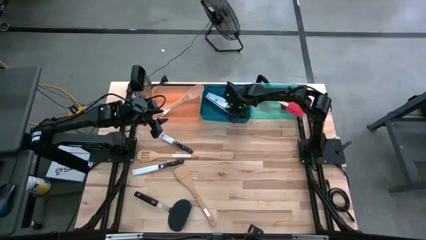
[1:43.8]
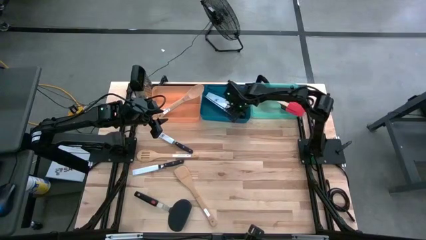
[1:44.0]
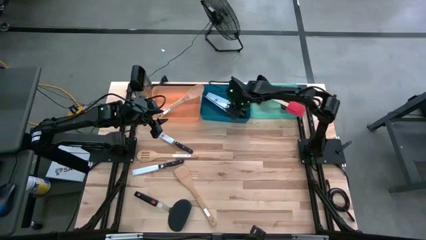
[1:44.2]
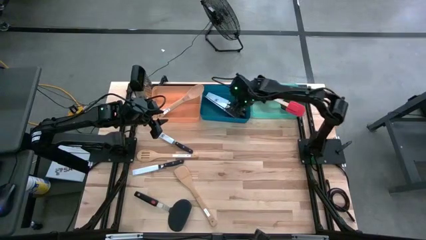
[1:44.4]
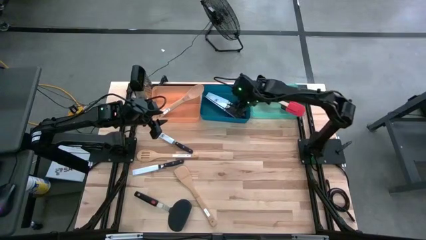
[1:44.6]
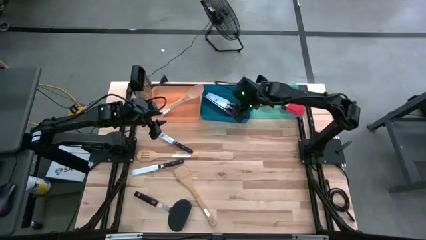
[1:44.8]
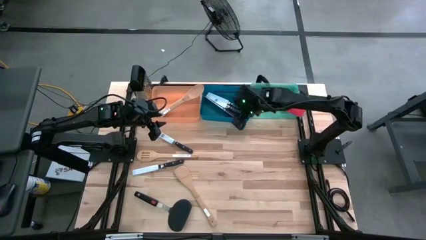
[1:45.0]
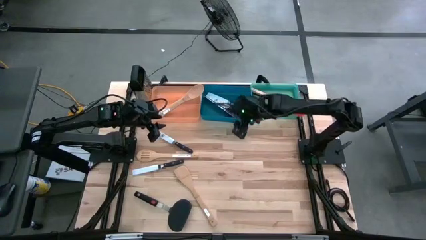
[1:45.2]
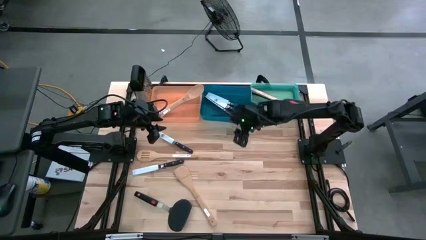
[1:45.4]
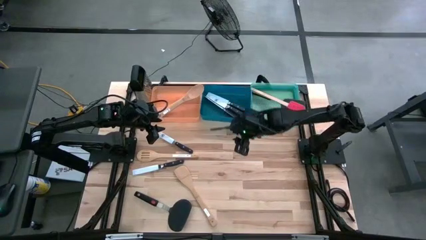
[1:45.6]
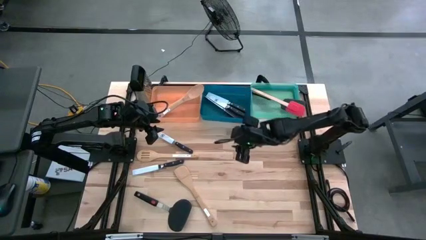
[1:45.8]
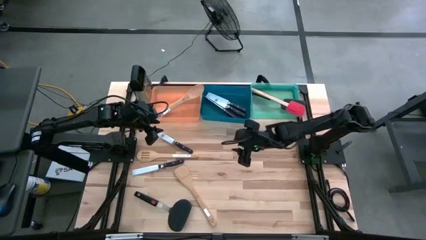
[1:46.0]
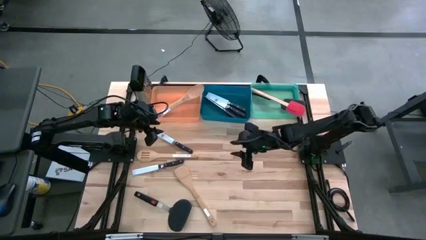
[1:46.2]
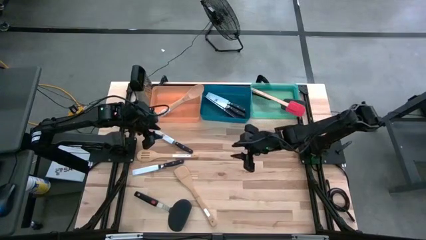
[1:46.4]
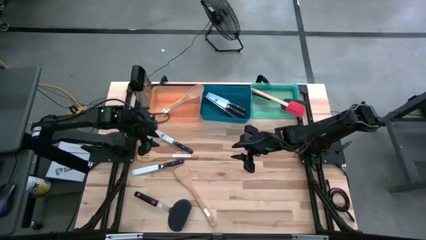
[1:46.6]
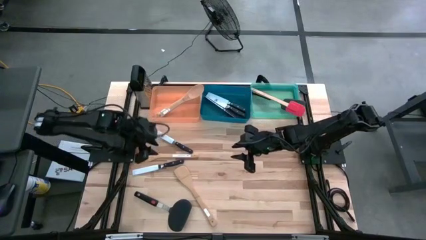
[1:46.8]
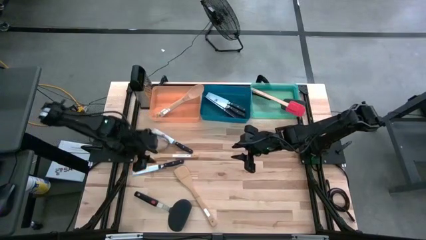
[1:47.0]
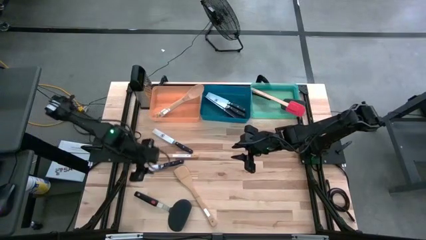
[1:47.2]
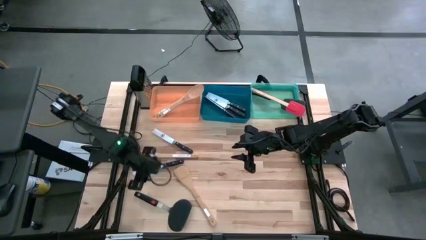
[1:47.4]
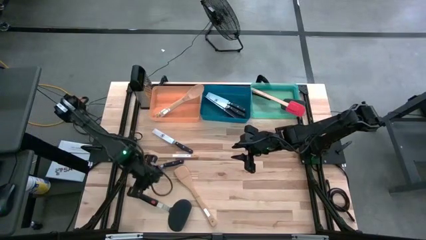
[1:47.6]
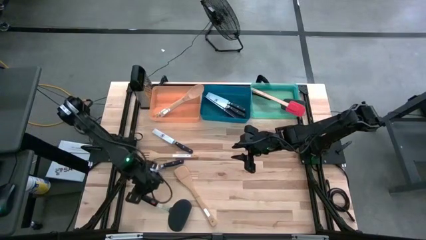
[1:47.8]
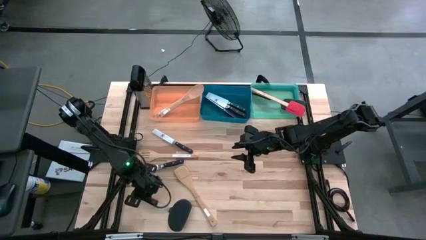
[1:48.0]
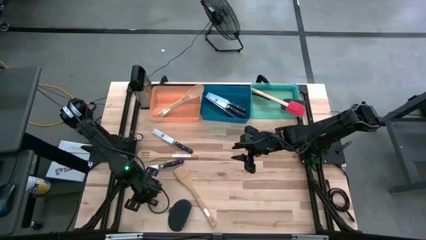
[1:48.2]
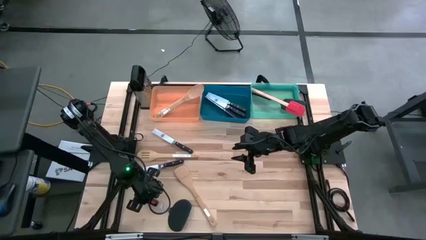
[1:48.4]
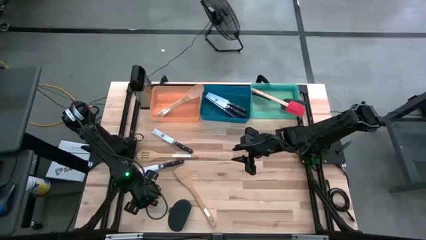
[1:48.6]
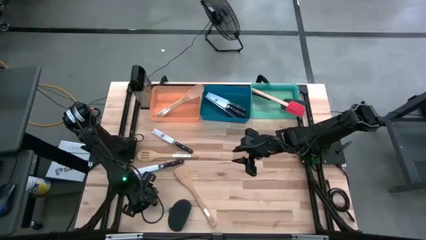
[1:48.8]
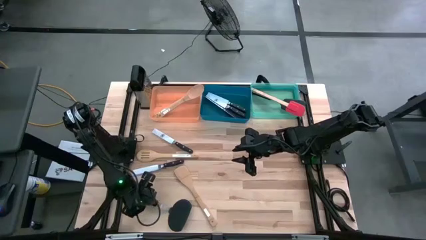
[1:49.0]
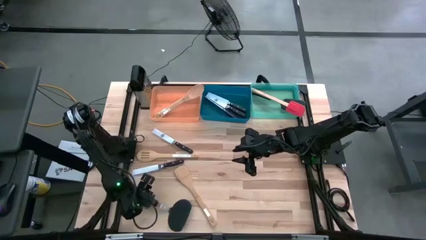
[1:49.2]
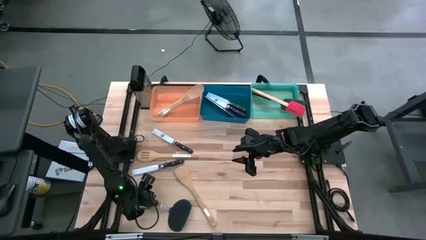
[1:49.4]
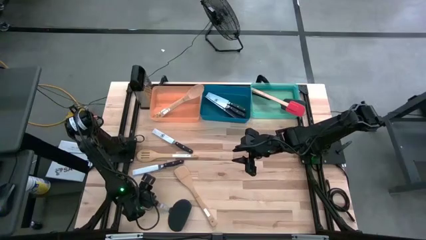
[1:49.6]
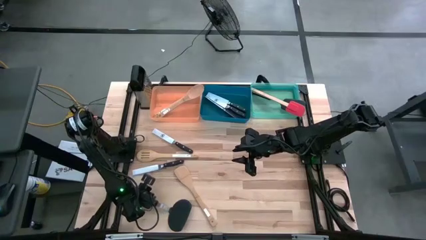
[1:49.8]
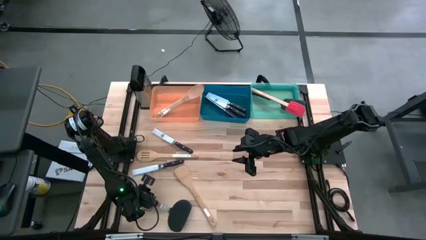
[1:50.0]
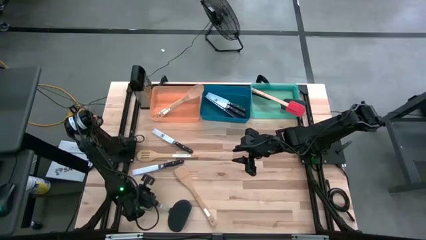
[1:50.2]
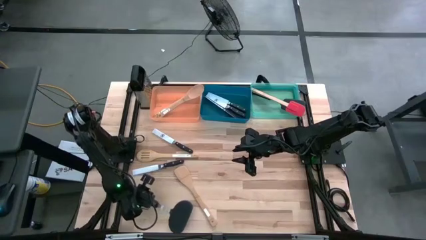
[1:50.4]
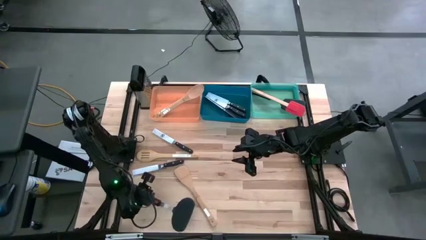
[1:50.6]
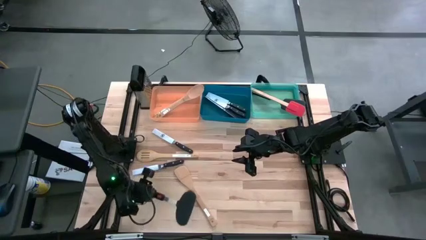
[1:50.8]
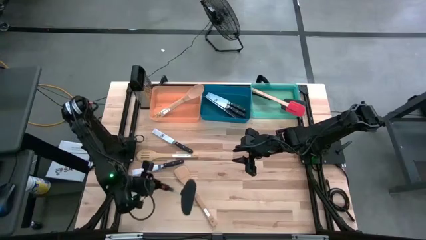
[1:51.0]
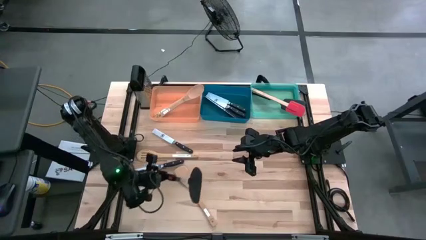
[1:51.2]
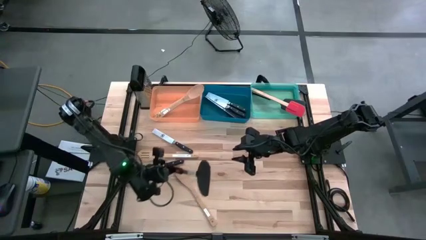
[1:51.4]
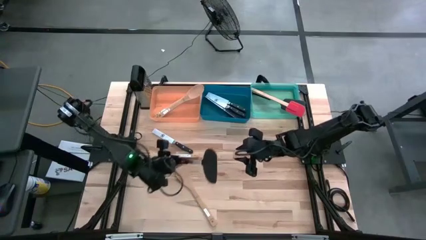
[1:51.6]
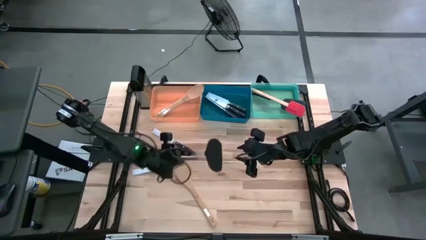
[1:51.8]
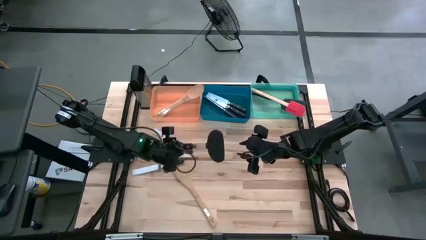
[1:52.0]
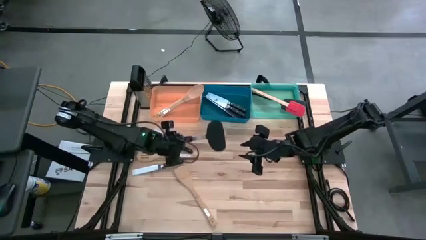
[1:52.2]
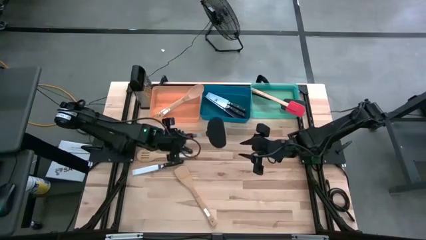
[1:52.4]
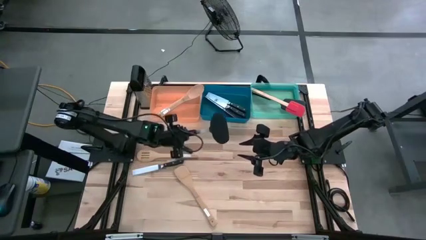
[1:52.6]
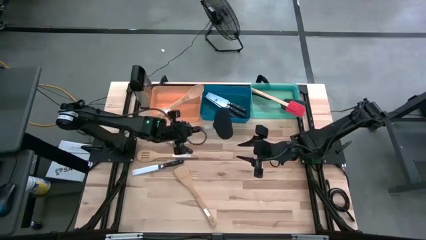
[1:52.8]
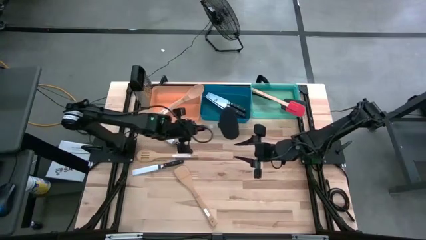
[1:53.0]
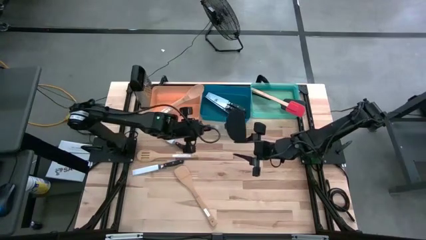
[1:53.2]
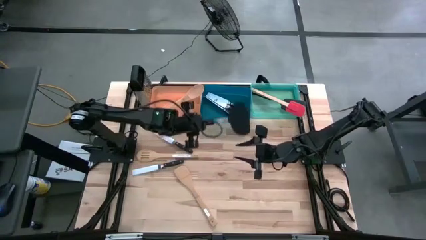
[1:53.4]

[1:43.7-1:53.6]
Task: Pick & Place Kitchen Items
Put black spatula into the green bin

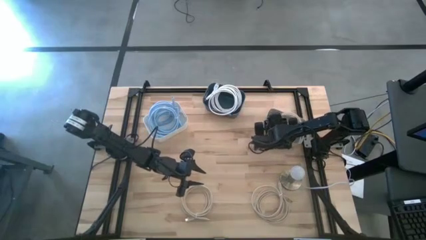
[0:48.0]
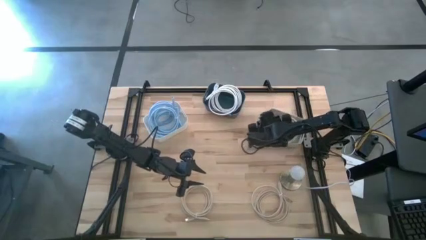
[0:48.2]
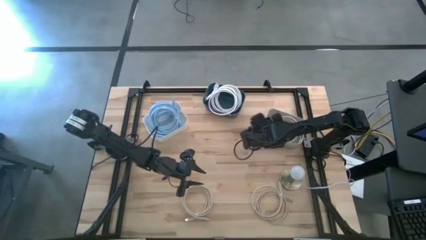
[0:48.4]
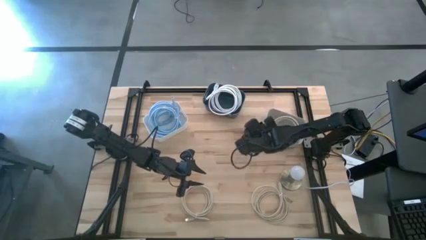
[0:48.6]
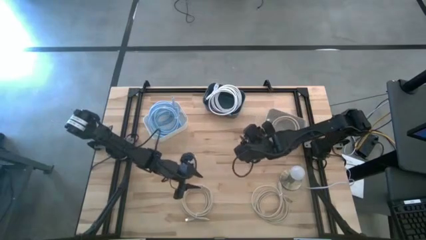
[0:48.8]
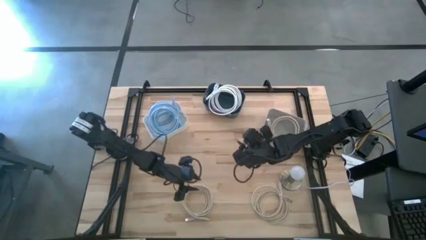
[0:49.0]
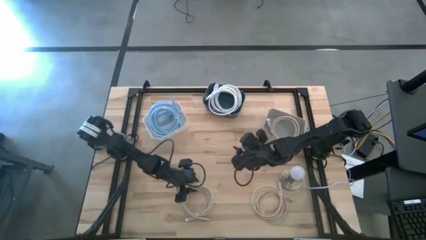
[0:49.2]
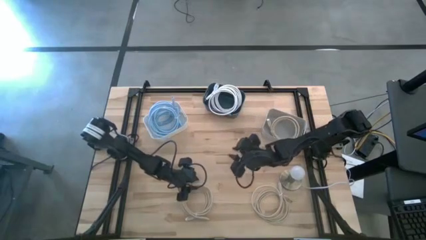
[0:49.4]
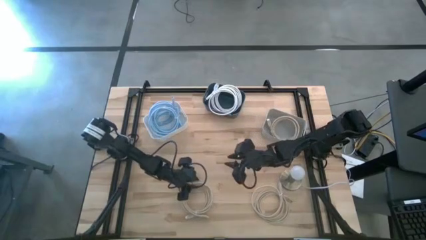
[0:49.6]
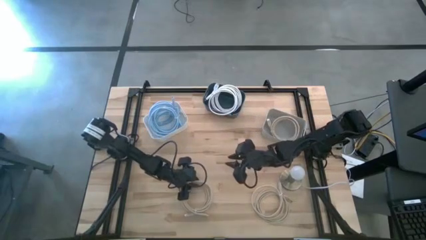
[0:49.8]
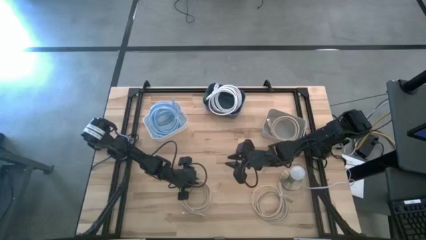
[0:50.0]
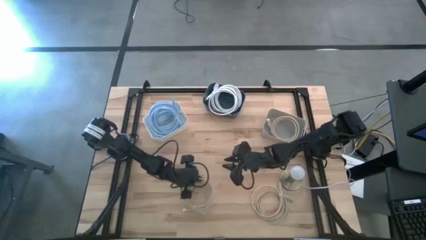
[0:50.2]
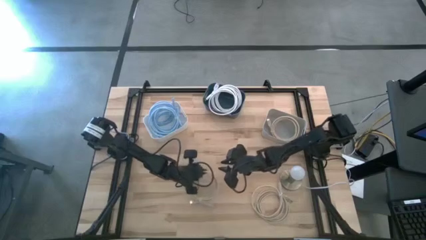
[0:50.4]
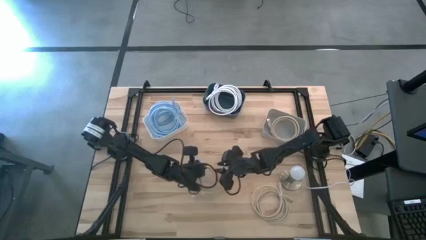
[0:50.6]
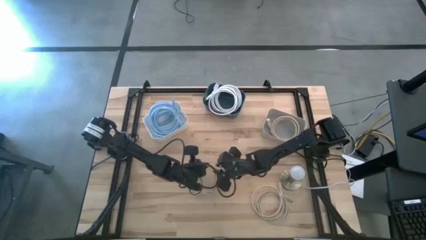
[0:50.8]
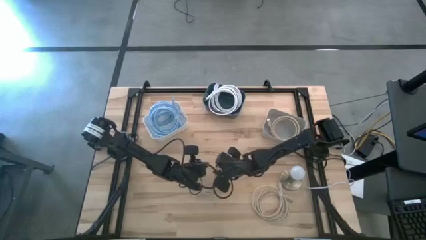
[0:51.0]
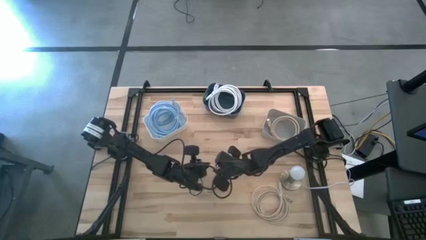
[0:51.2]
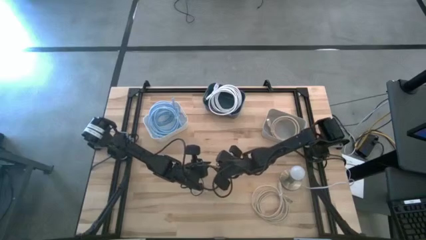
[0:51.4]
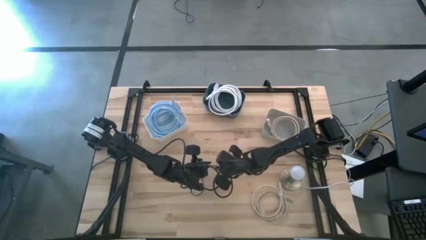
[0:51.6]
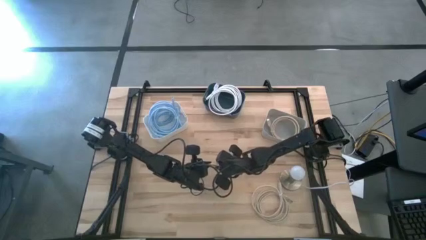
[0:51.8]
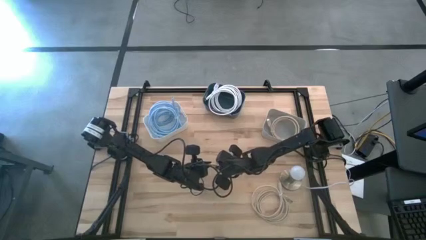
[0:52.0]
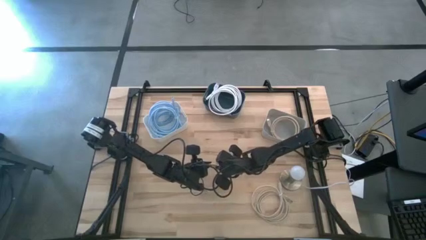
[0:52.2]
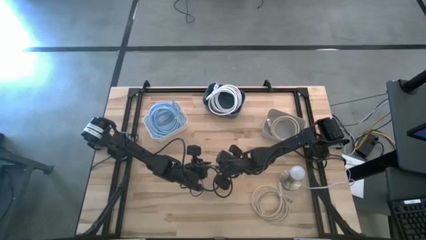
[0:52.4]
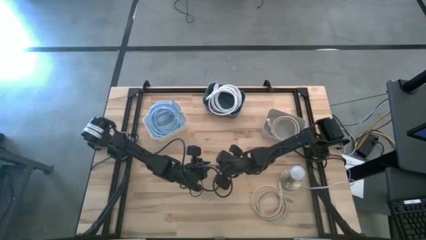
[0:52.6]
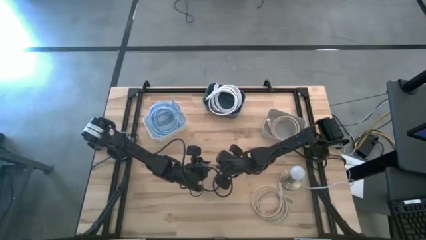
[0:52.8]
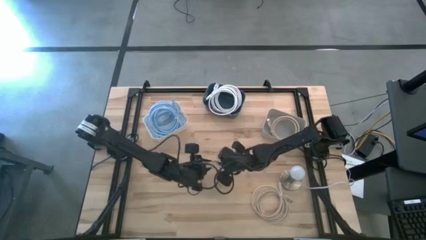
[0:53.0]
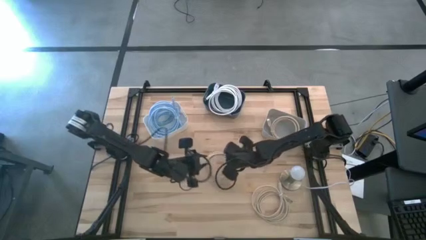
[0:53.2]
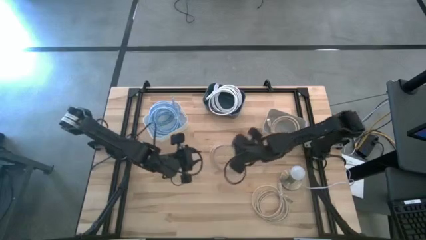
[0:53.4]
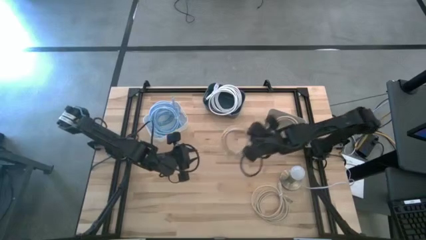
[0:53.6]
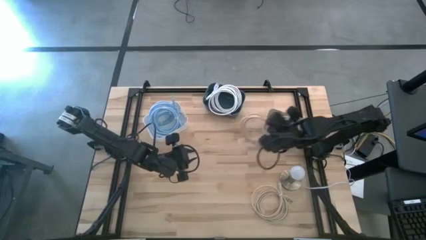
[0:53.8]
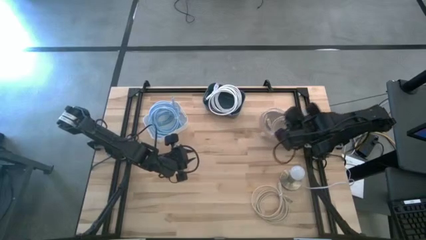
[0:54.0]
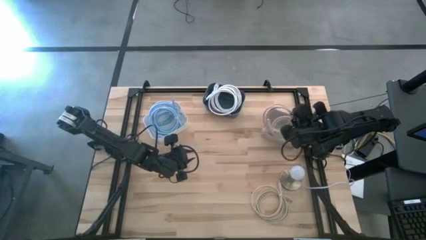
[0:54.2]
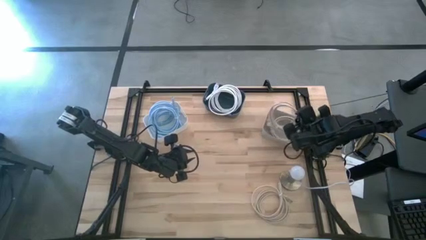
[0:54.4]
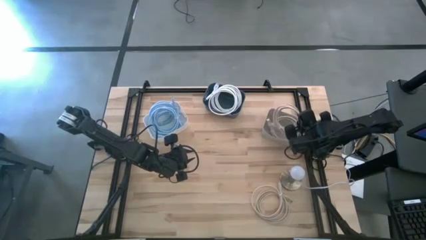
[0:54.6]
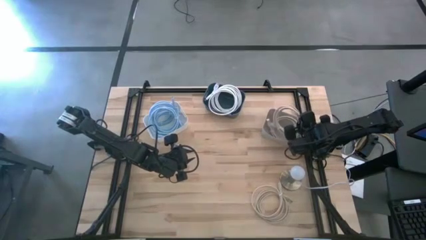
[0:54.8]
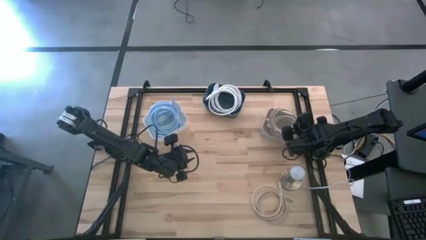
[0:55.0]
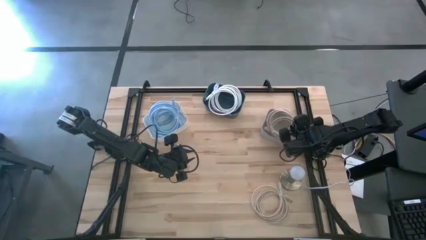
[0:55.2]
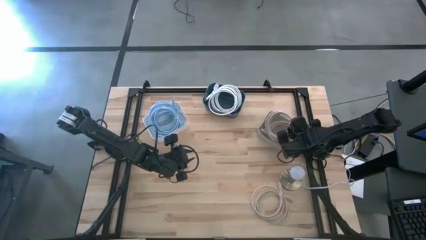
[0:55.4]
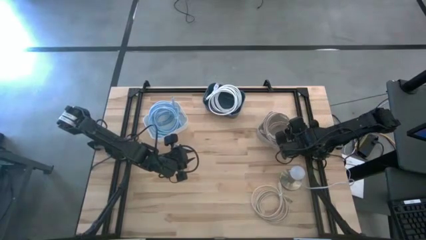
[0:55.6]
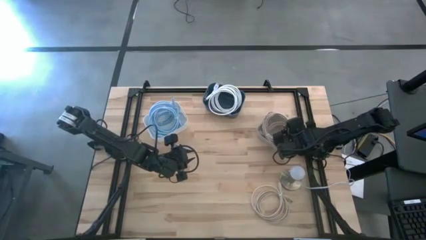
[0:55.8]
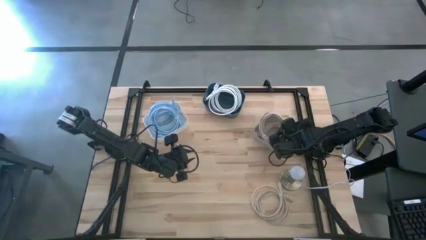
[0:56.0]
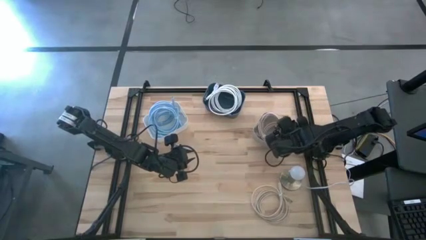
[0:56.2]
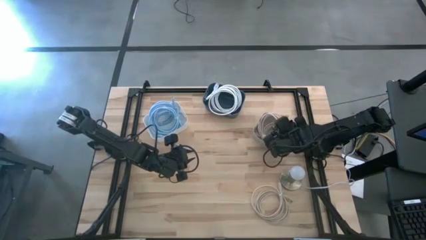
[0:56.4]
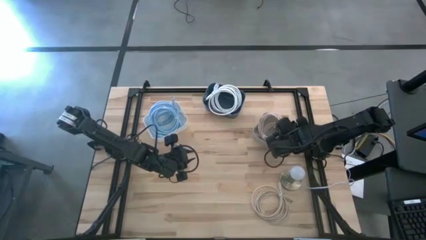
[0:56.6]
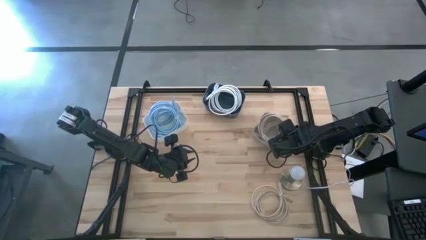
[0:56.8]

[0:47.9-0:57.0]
Task: Pick & Place USB Port
Put the left brown usb cable into the gray bin
